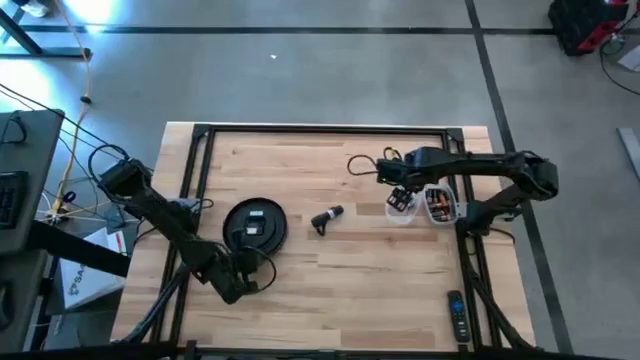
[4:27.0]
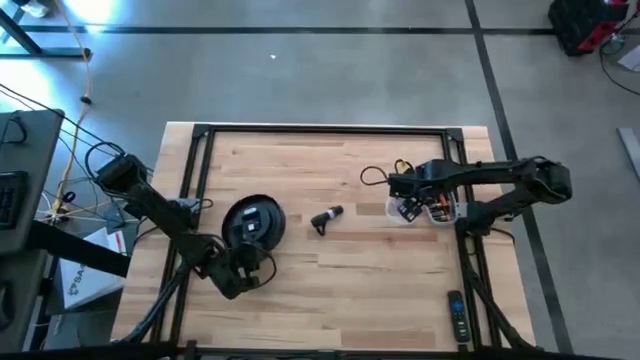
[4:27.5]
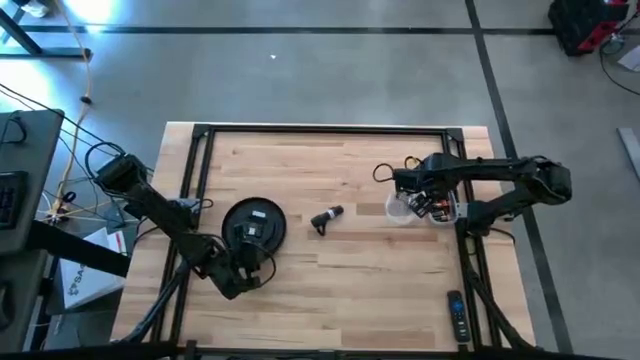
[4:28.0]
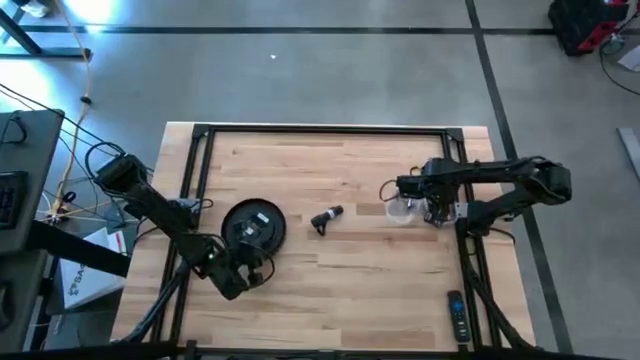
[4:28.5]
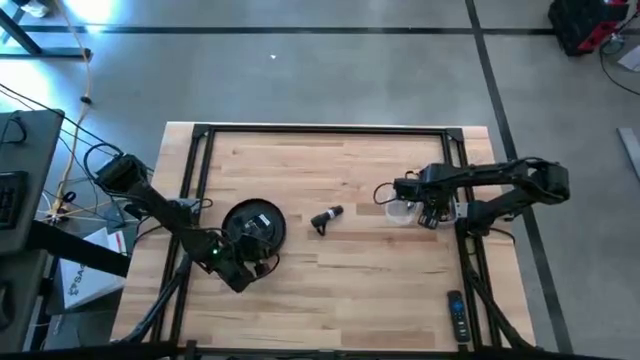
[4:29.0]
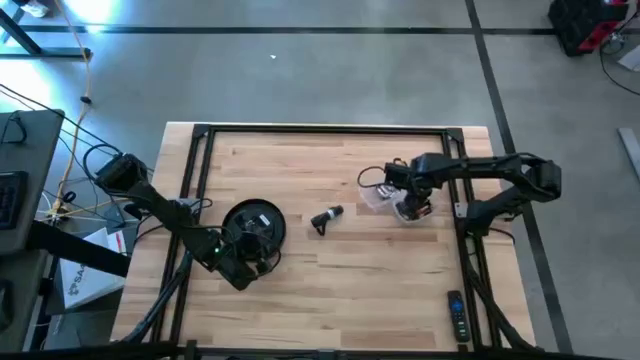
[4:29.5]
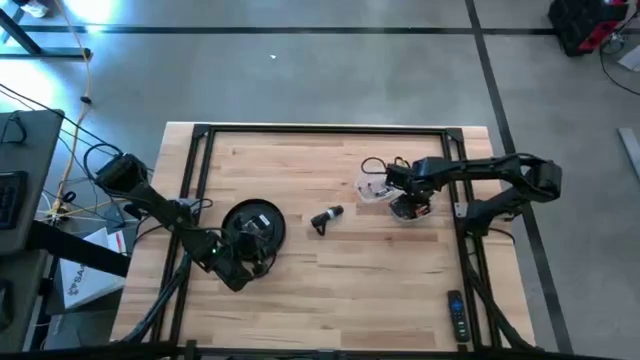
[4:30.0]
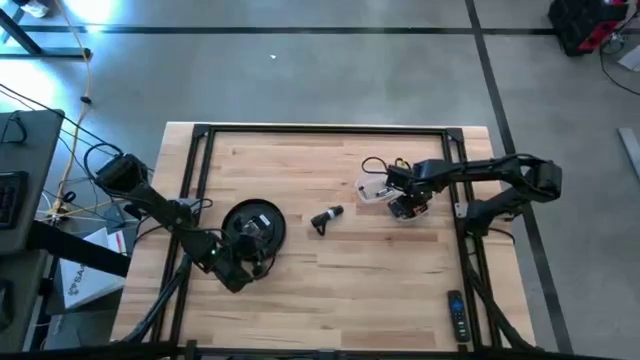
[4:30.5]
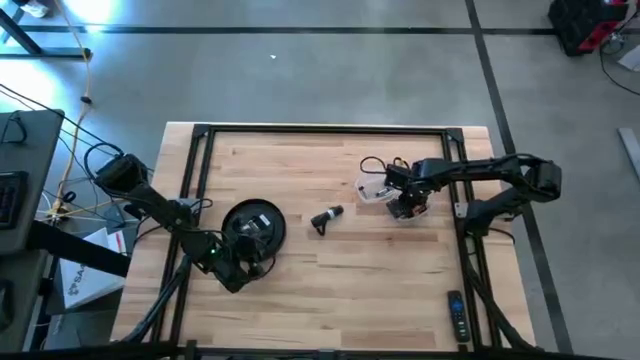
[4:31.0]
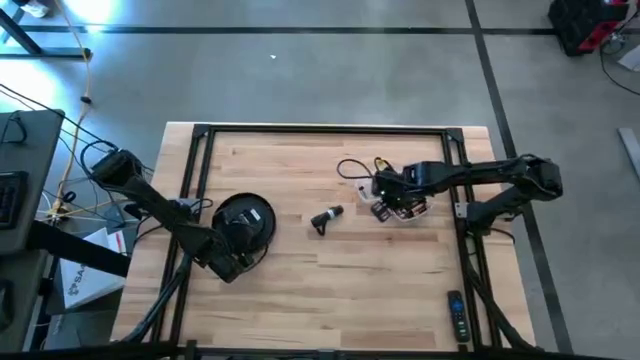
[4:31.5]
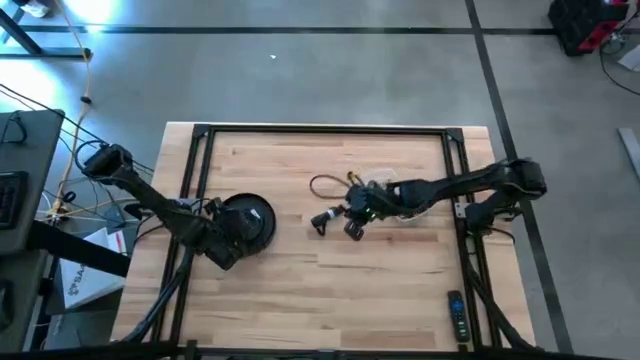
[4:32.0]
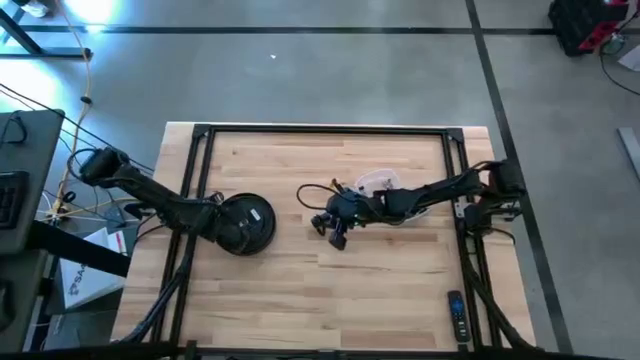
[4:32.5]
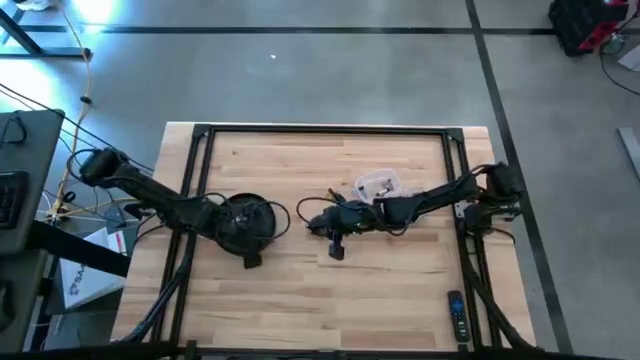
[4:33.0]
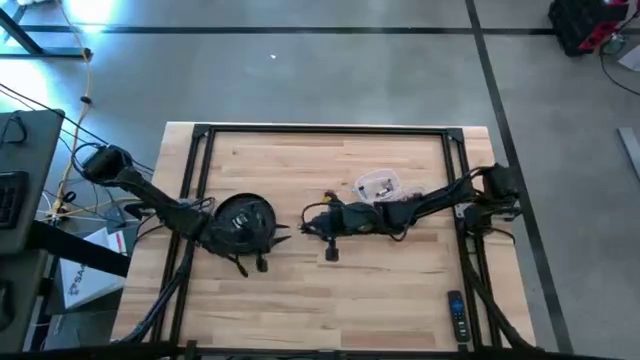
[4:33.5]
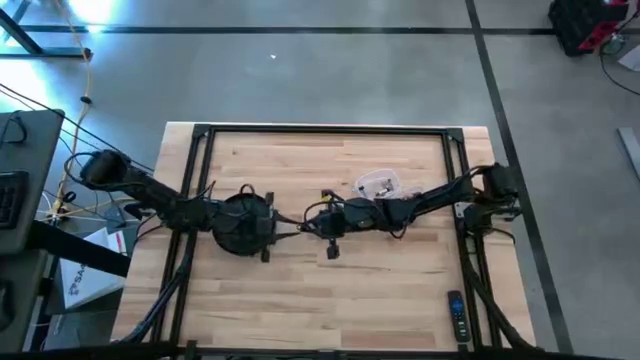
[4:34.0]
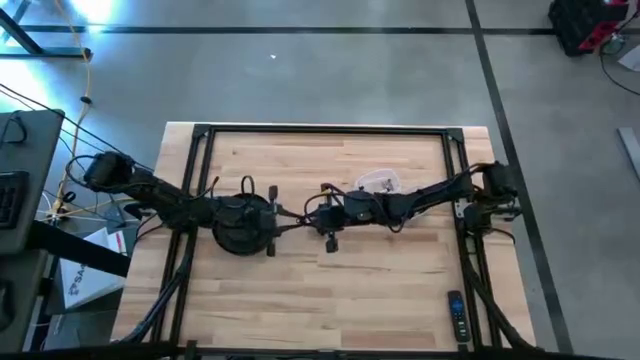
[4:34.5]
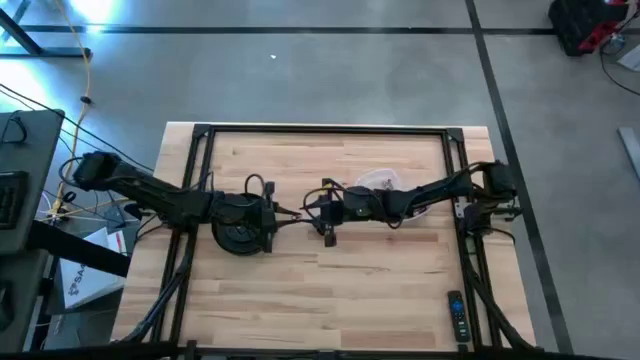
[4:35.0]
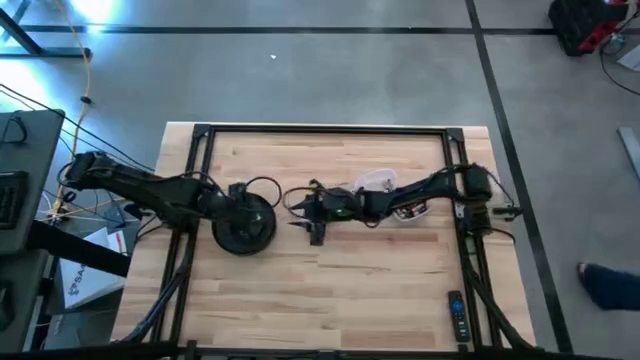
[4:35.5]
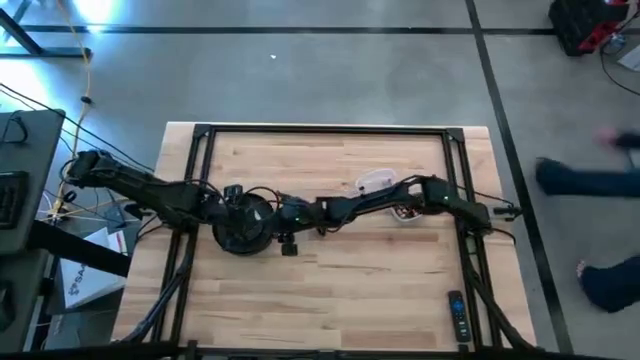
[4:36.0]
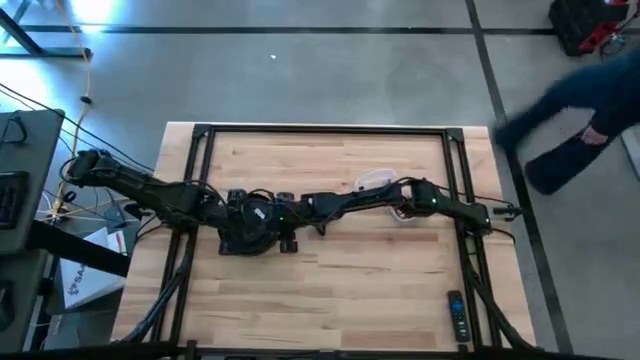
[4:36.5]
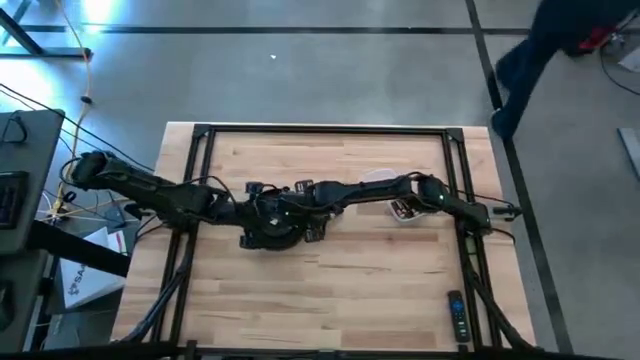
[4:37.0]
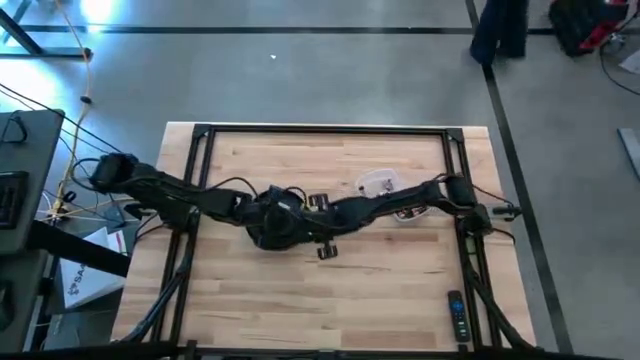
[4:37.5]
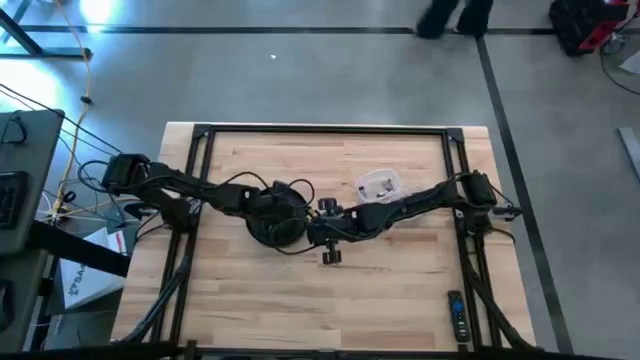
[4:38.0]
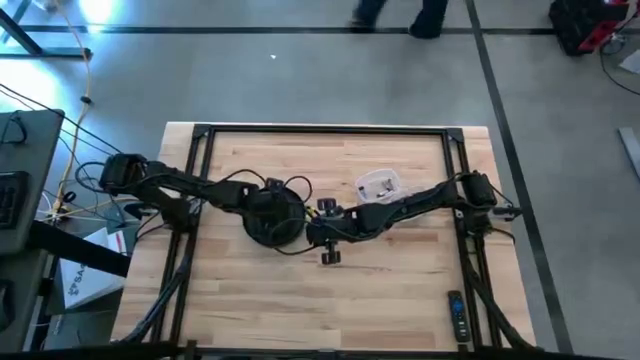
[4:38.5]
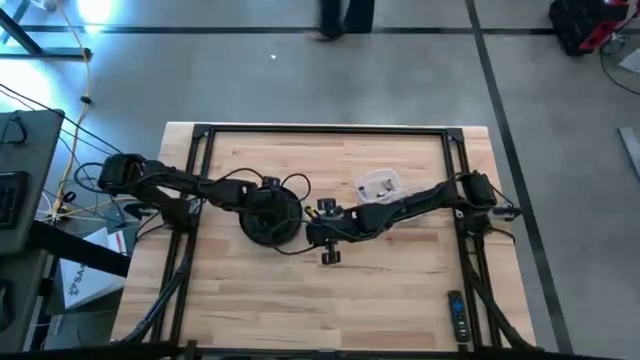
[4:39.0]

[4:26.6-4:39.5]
Task: Insert battery
Insert the black battery into the black wall clock battery compartment

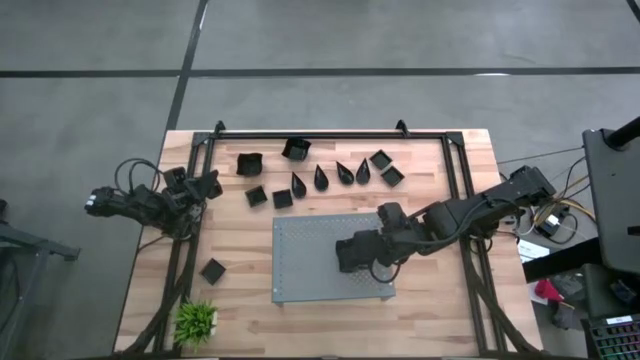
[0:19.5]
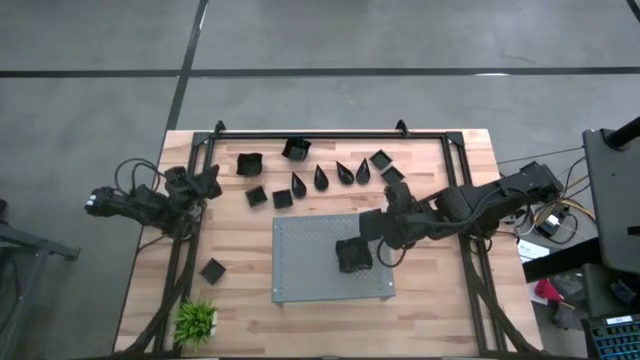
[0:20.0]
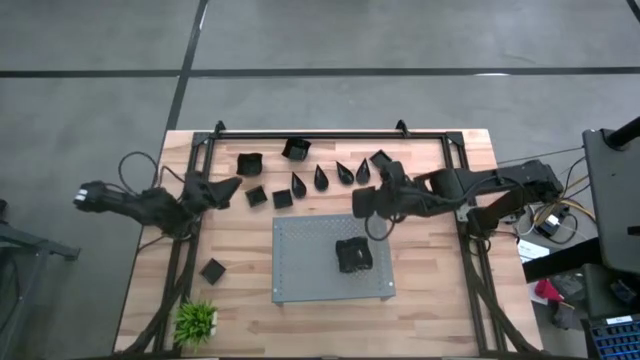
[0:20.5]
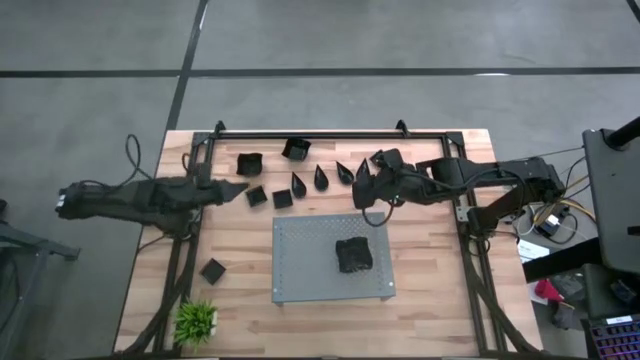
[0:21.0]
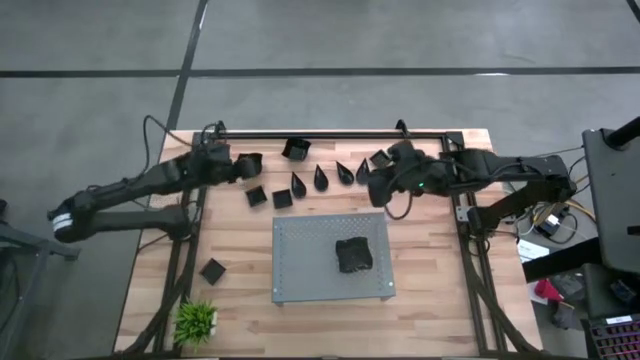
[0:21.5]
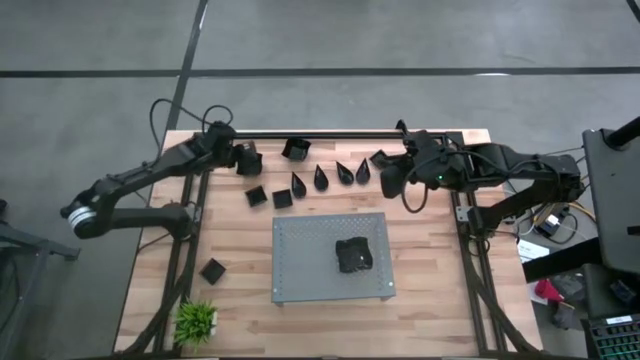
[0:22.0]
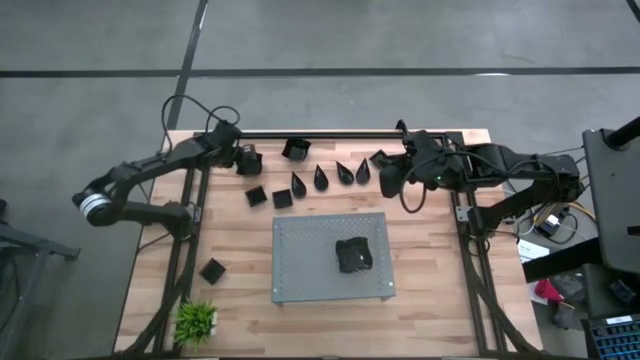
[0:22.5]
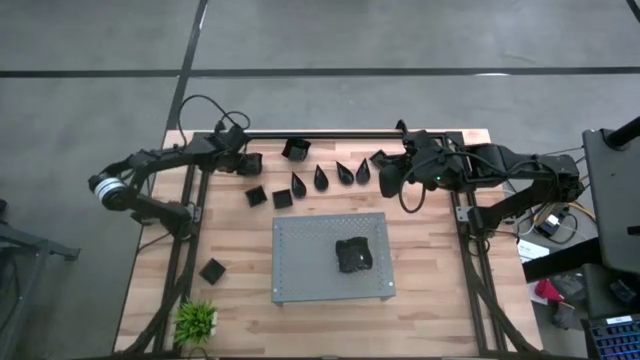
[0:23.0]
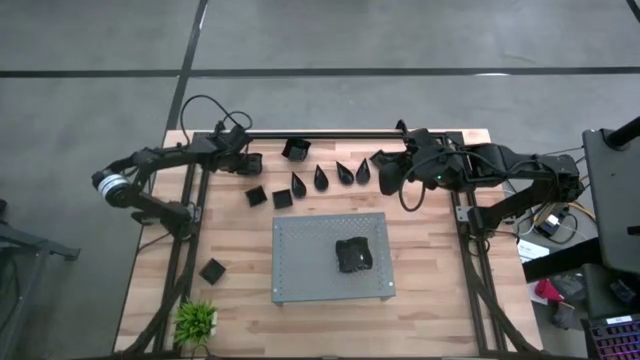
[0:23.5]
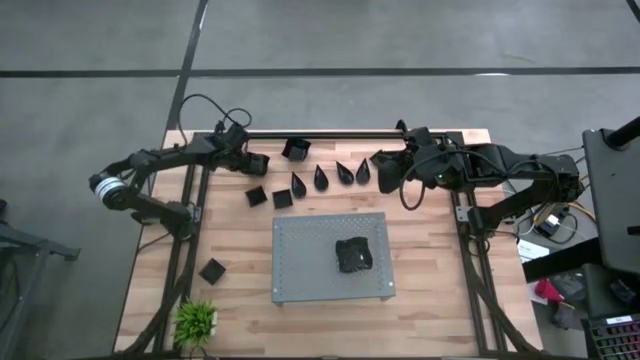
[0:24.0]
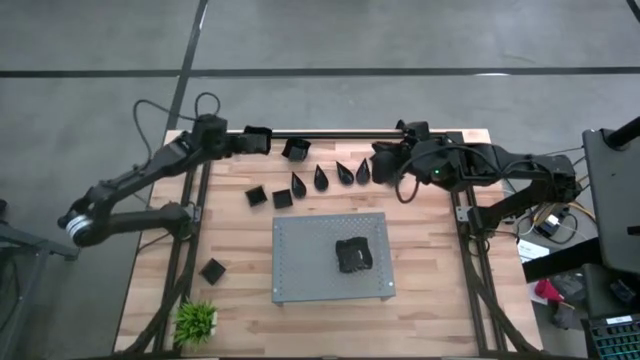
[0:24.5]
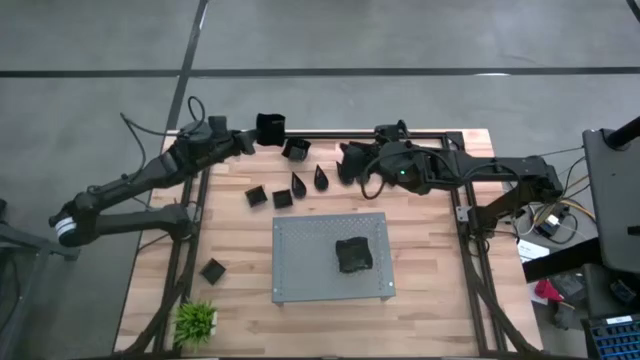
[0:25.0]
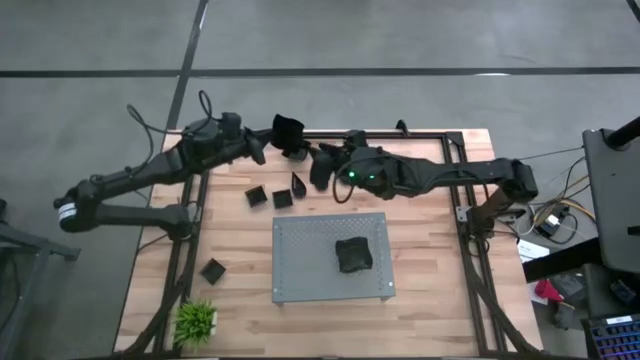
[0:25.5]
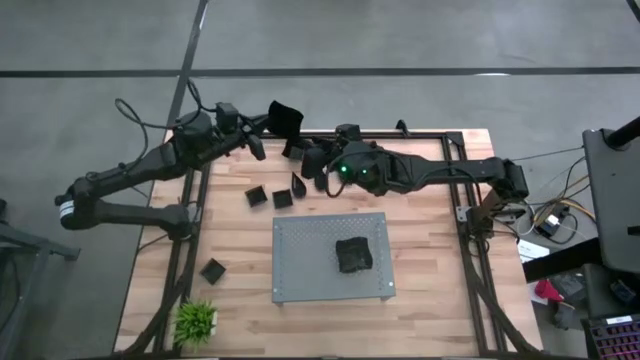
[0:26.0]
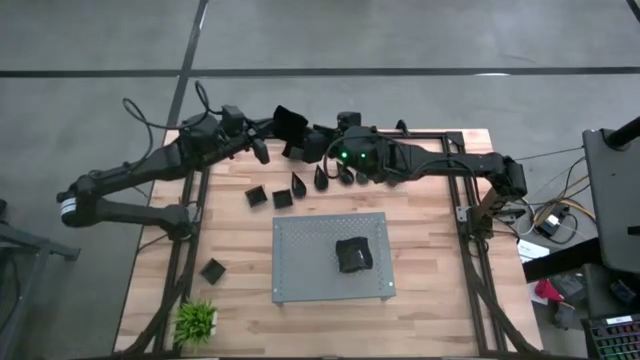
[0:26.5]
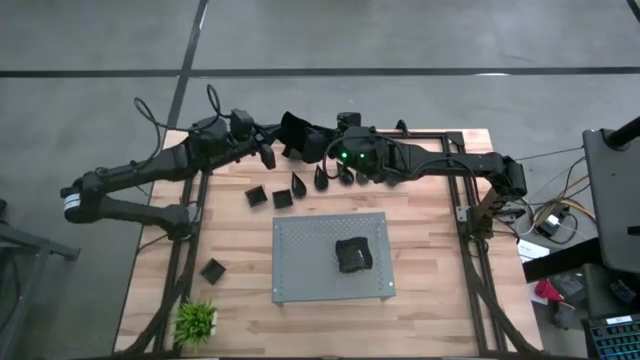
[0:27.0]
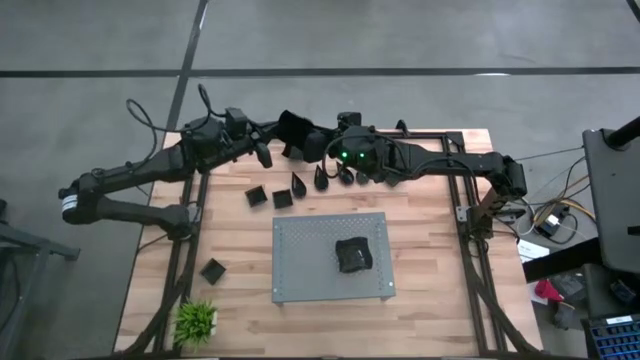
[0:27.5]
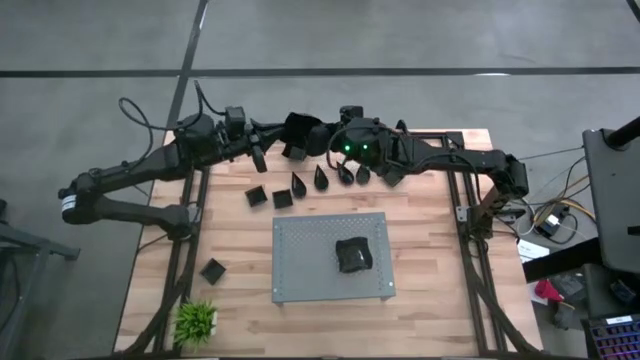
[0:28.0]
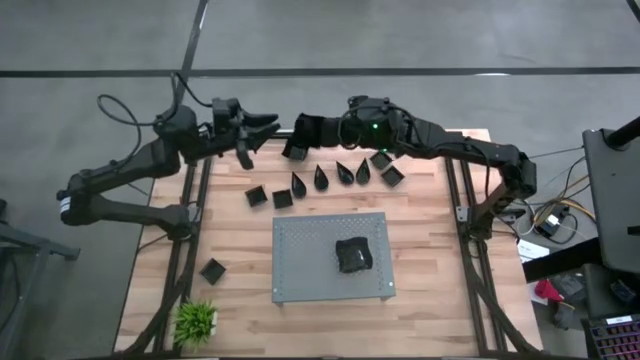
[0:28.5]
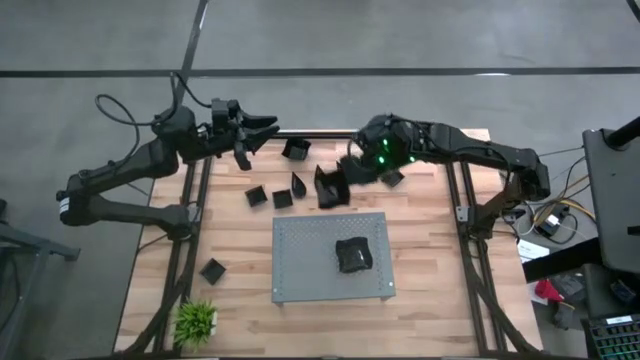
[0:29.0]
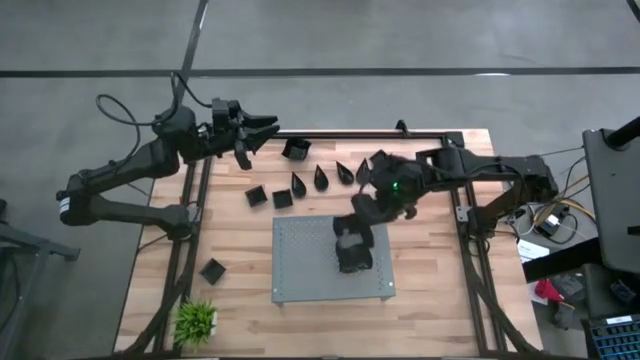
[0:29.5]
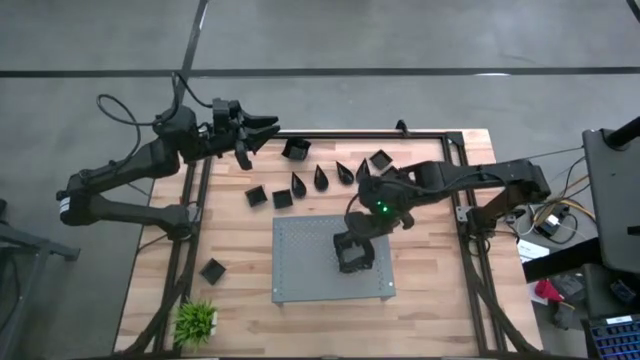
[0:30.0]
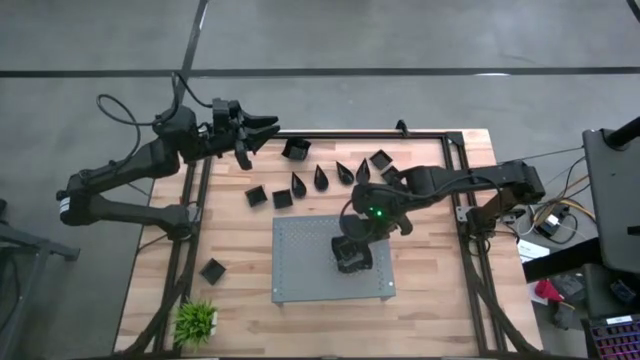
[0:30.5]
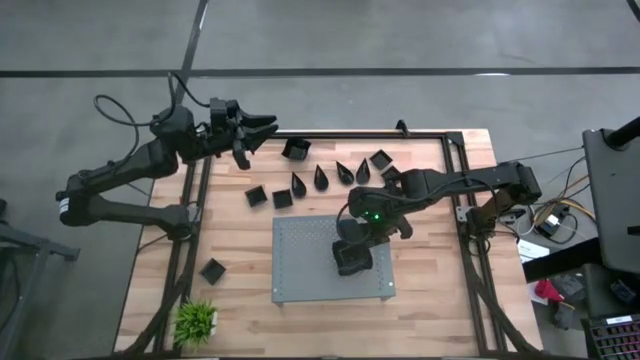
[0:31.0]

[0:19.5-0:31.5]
Task: Pick & Place Mini shaped plates
Stack the distorted square plate on top of the other distorted square plates on the shelf
